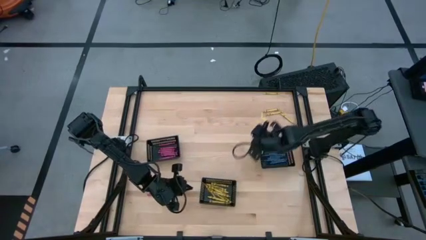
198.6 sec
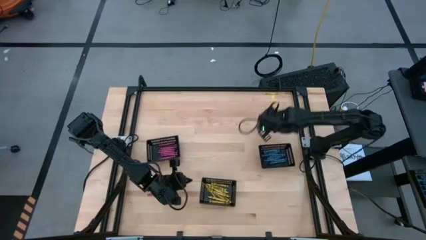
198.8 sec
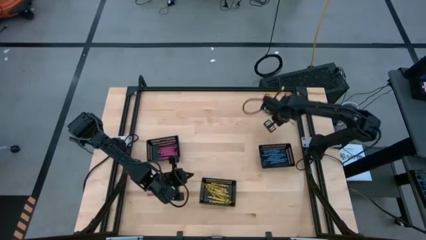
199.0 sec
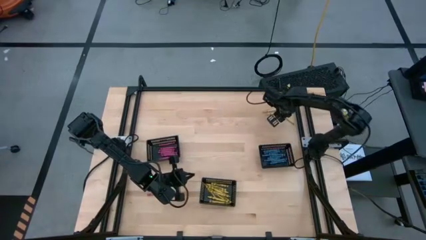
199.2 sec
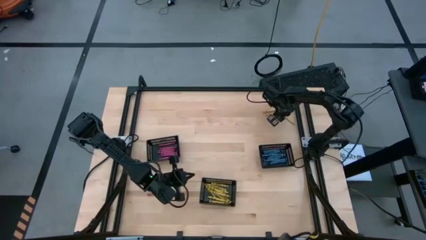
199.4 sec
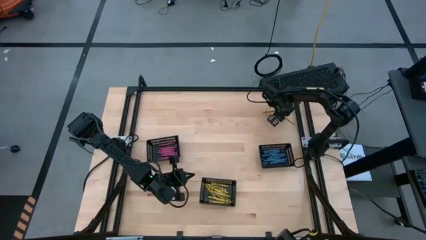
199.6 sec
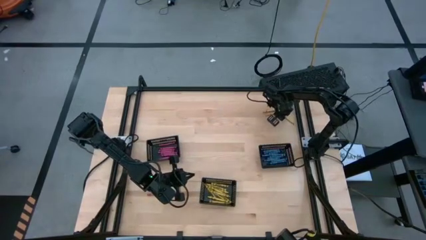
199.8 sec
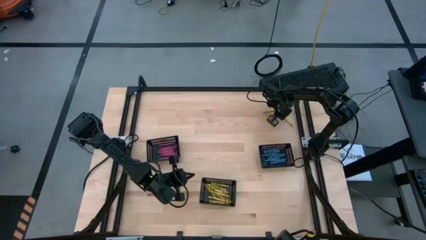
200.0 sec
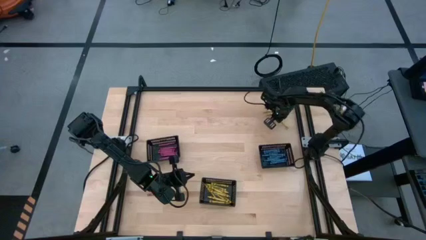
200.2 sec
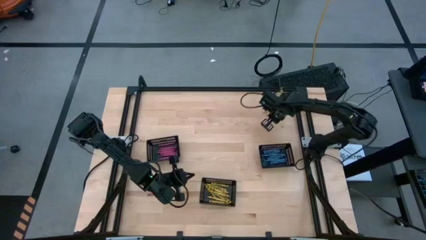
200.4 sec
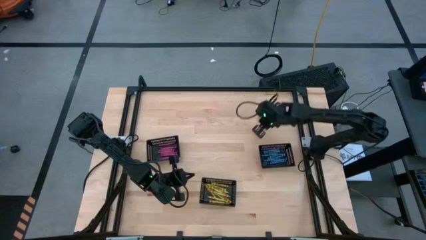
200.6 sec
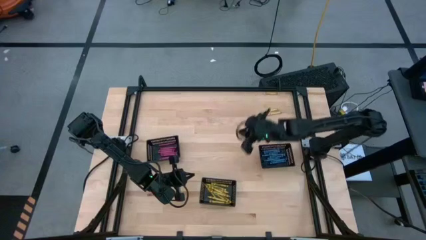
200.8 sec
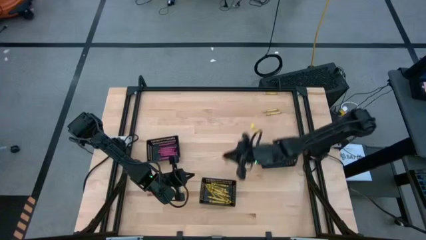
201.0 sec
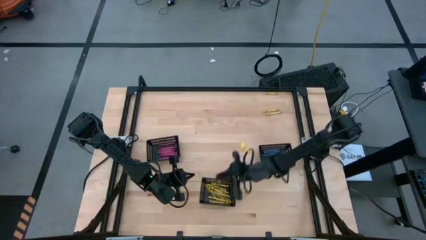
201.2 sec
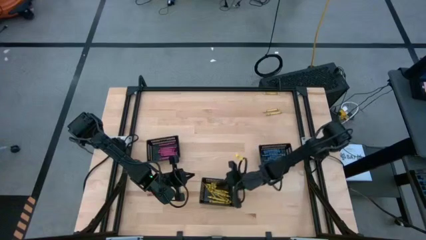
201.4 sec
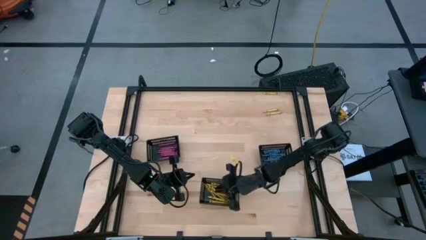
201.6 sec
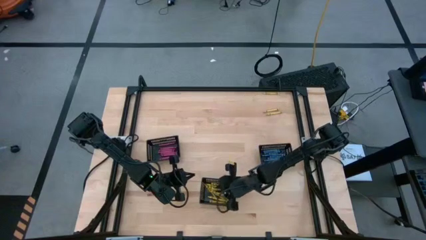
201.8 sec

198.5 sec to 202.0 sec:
Task: Sort crayons
Put the yellow crayon into the bottom black bin

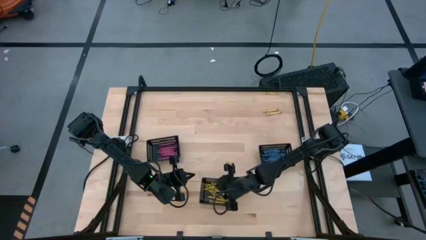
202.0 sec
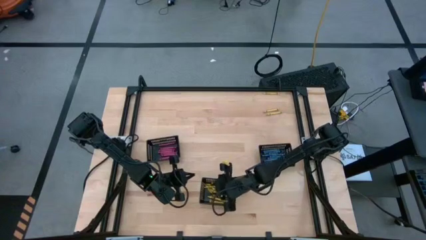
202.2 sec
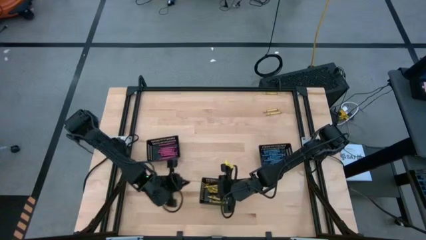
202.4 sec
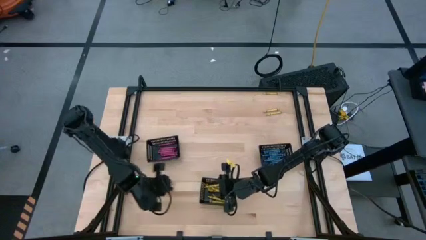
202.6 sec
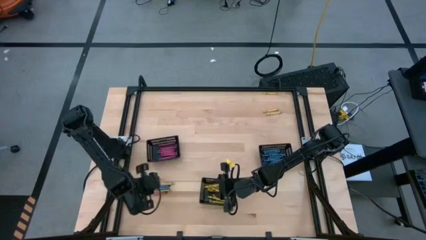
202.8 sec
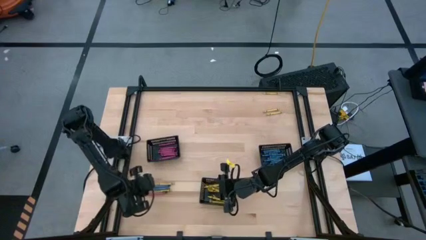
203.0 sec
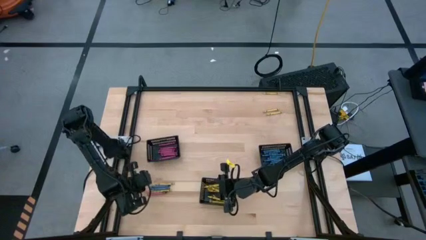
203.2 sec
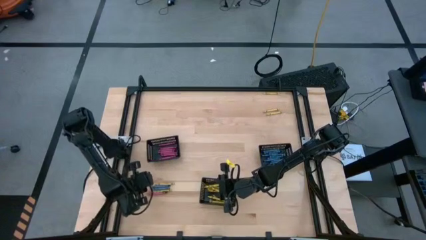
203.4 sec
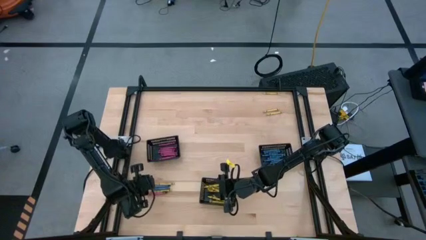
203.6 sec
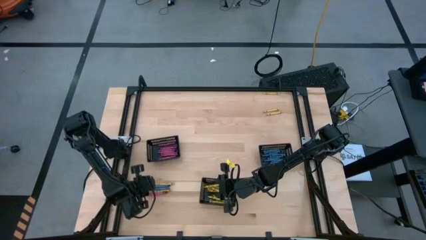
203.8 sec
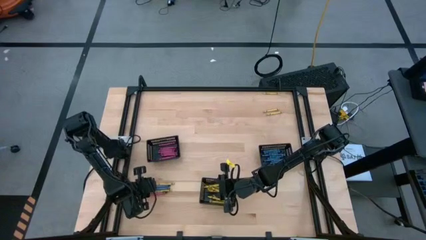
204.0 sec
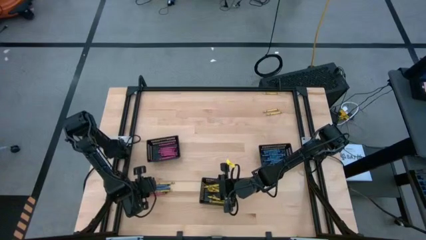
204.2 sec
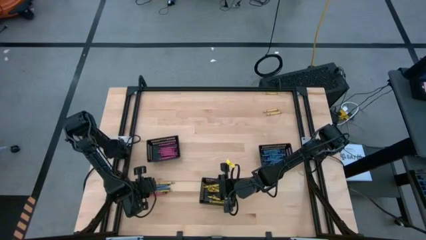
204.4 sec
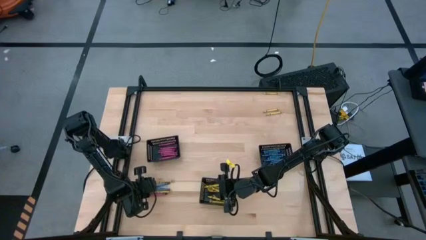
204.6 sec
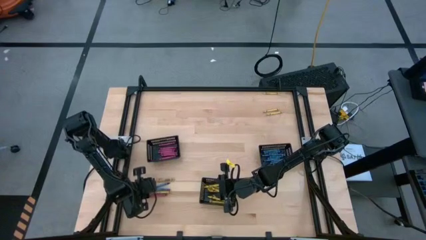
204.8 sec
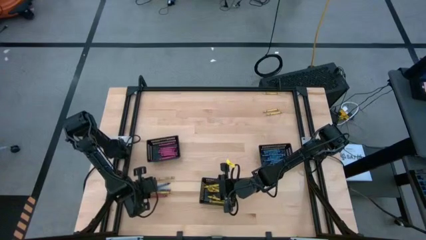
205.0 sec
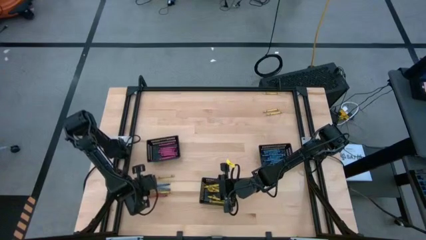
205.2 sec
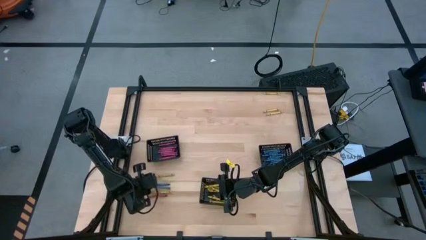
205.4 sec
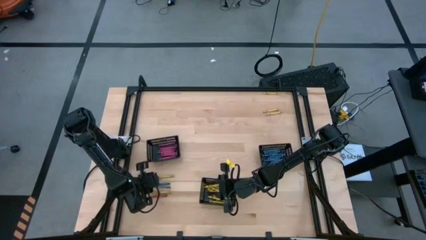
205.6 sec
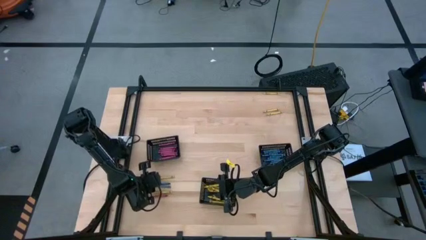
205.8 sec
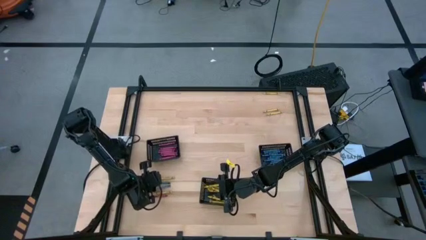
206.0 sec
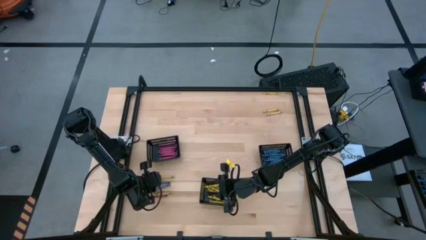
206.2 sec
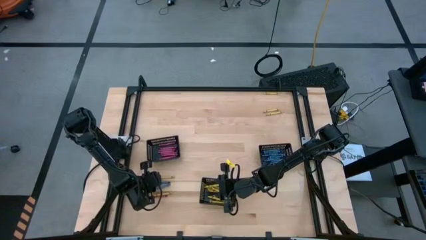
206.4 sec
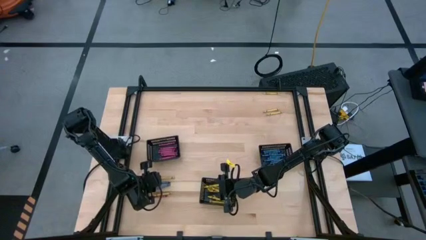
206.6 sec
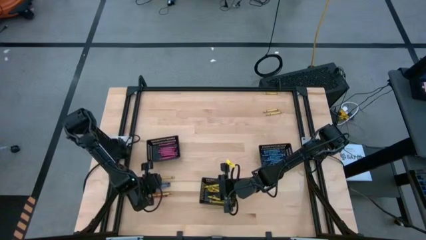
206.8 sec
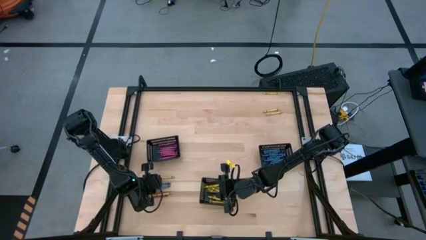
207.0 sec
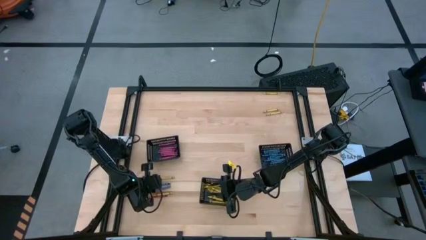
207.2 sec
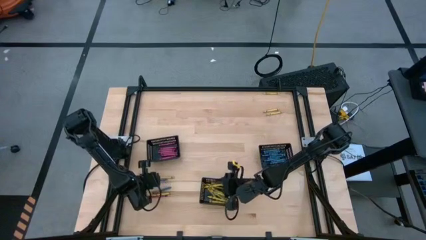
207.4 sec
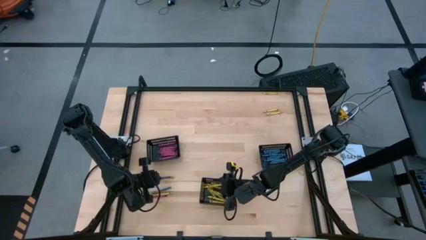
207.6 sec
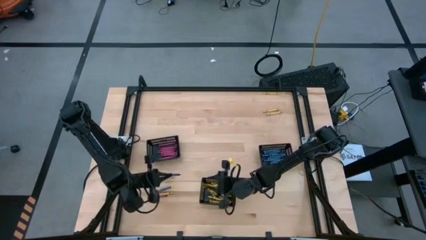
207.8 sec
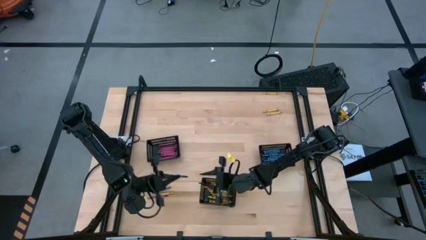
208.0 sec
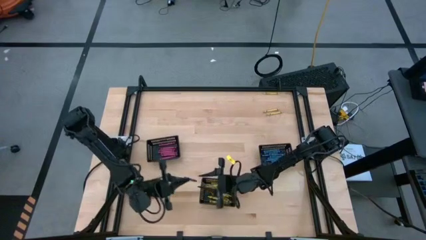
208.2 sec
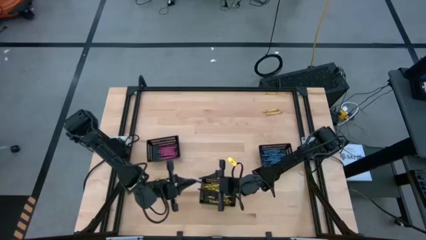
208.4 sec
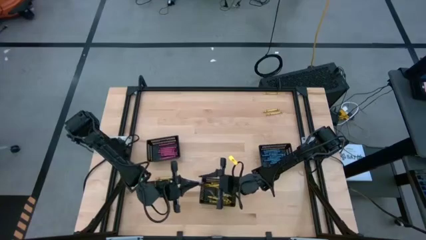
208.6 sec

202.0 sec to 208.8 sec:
Put the blue crayon into the right black bin

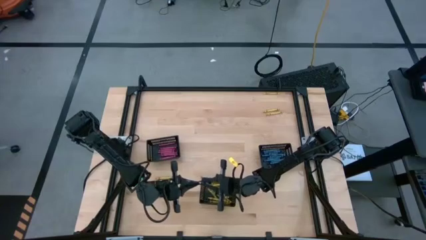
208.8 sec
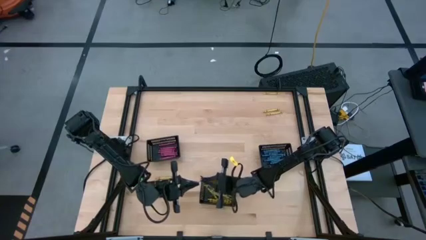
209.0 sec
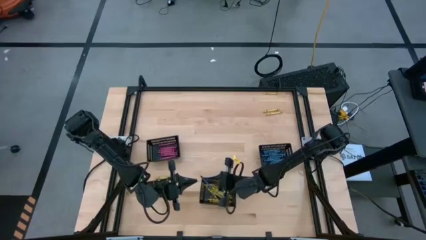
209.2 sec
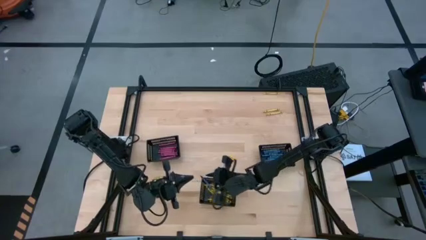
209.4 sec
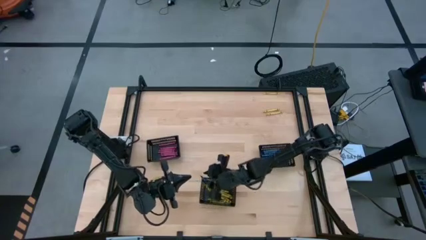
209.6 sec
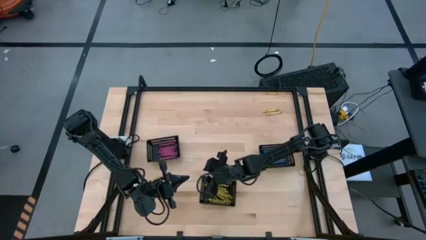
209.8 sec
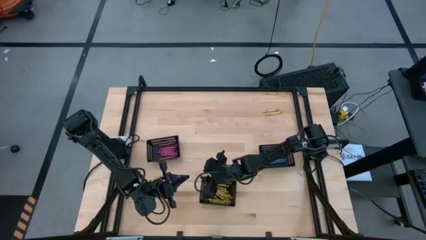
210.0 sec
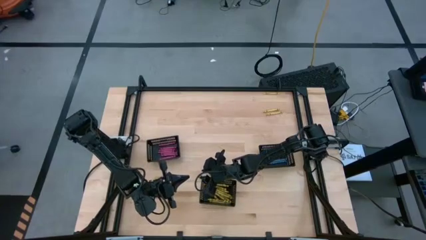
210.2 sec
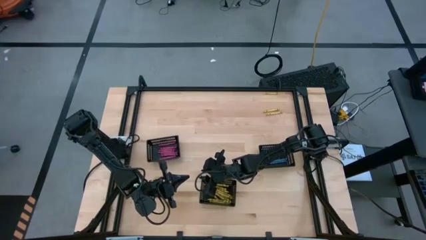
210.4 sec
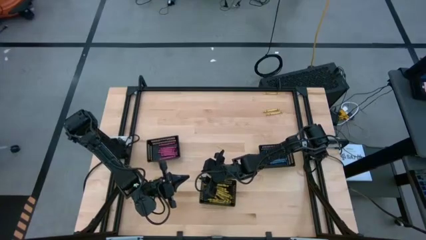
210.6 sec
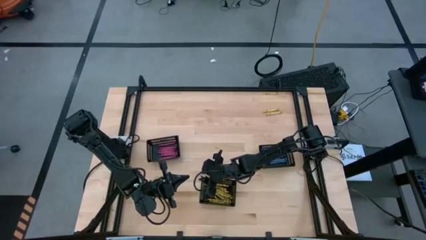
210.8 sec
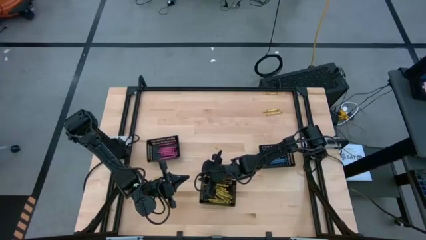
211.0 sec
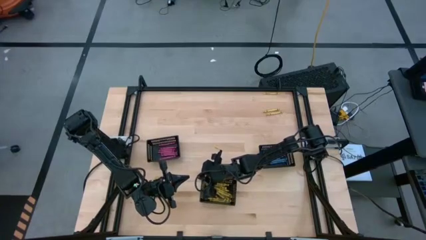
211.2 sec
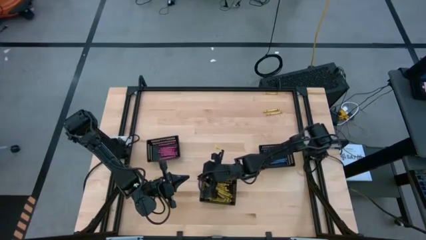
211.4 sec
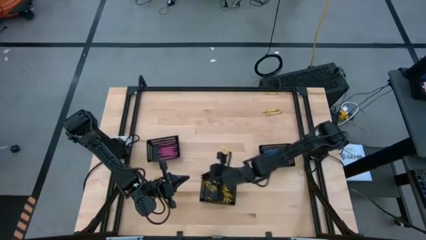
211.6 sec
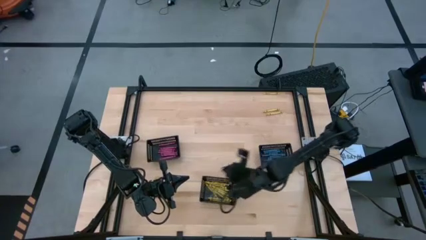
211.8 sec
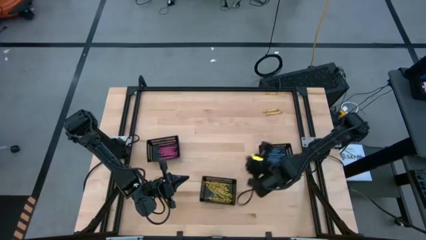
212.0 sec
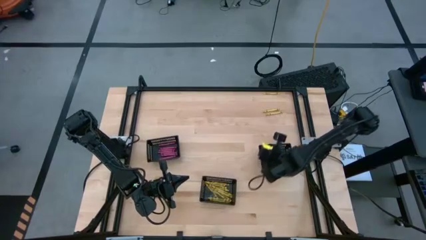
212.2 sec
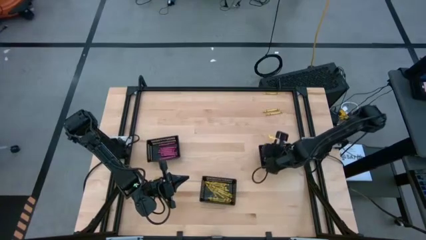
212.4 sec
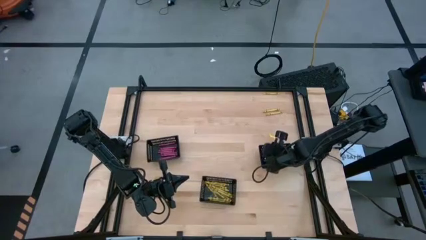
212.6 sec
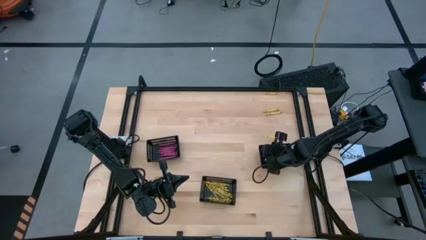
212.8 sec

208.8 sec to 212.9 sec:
Put the blue crayon into the right black bin

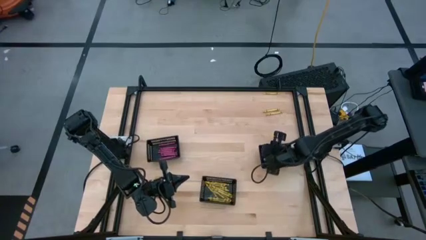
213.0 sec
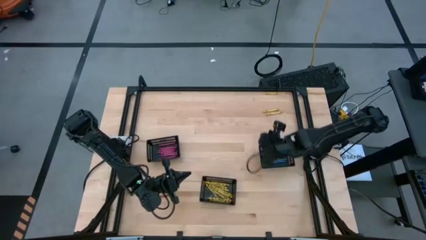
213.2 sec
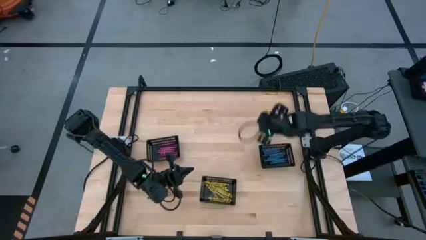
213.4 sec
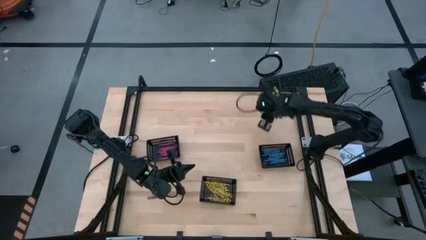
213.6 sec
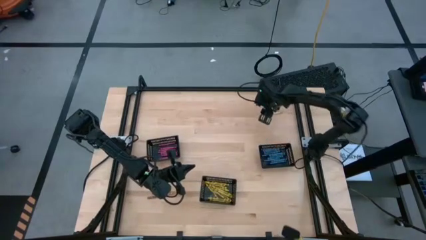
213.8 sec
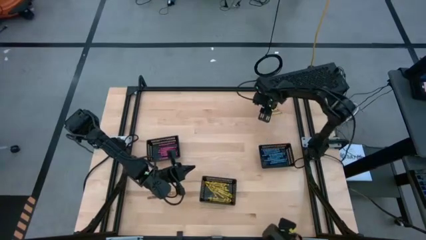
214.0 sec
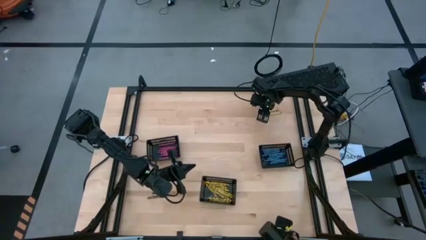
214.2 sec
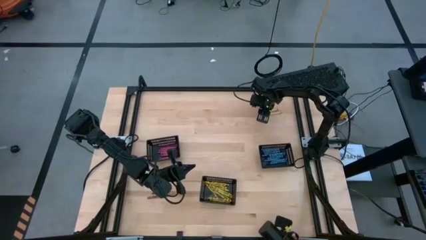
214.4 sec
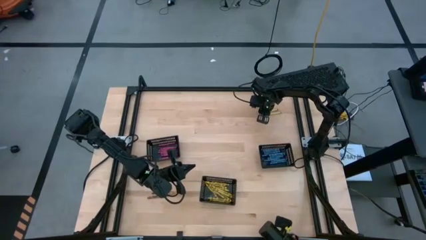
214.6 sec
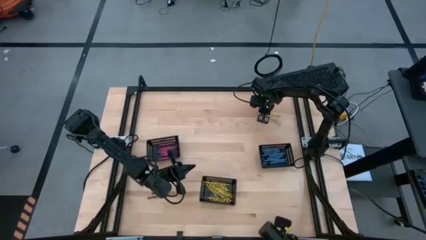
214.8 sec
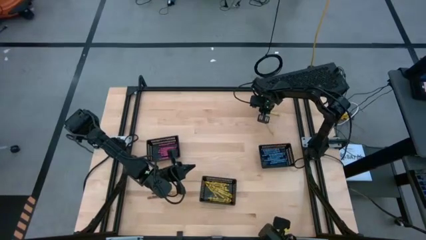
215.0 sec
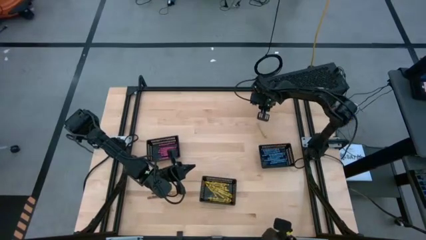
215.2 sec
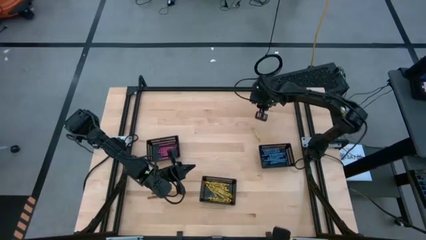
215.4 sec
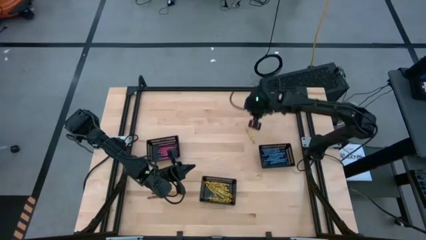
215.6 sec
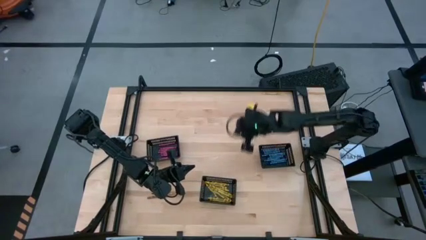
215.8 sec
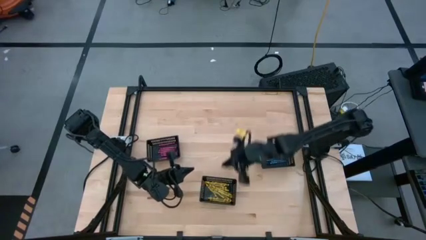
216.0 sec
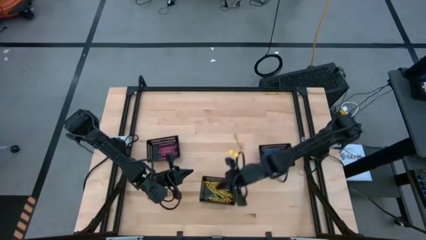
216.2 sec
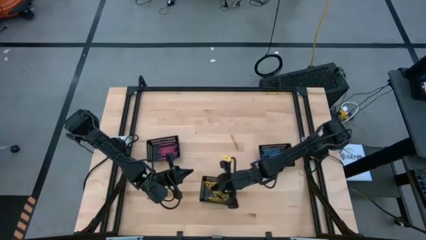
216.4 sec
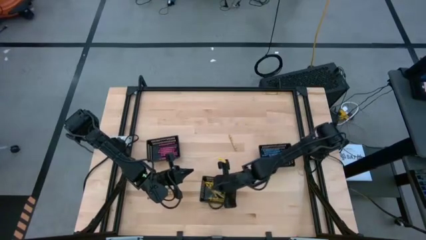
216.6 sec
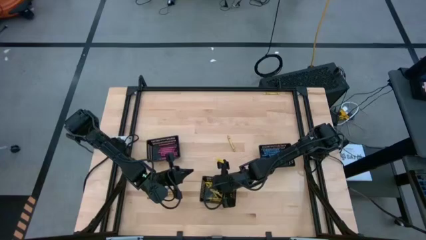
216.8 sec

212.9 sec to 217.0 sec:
Put the yellow crayon into the bottom black bin
